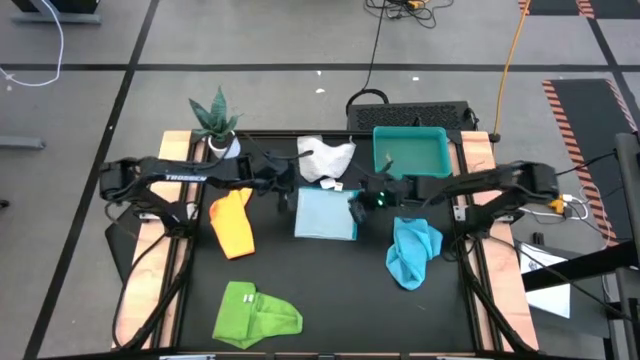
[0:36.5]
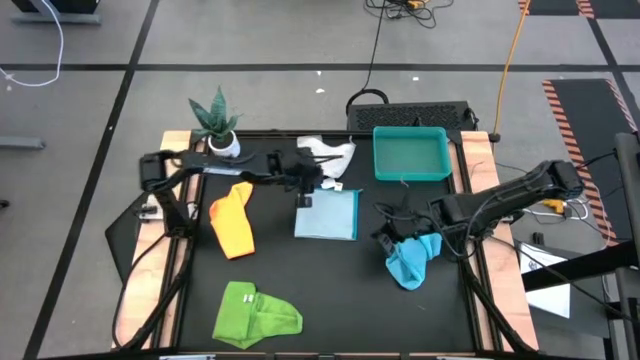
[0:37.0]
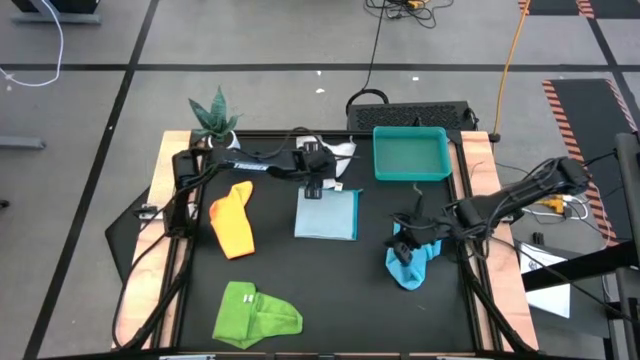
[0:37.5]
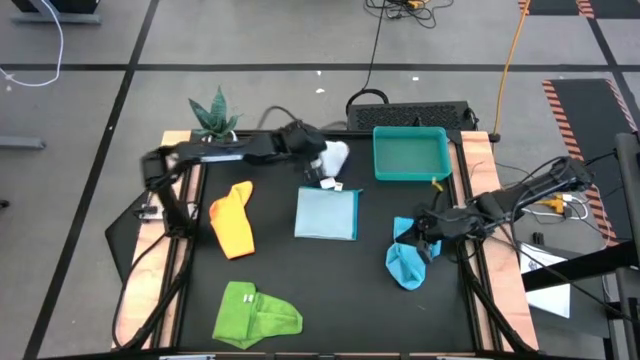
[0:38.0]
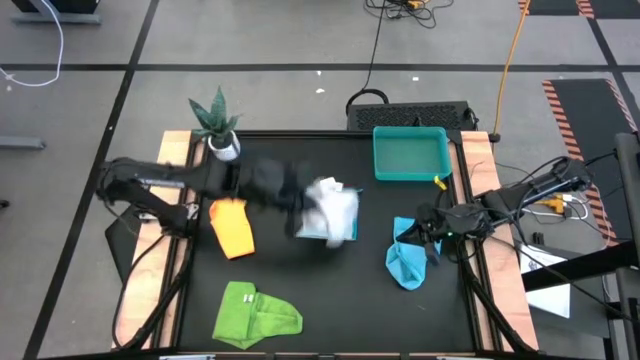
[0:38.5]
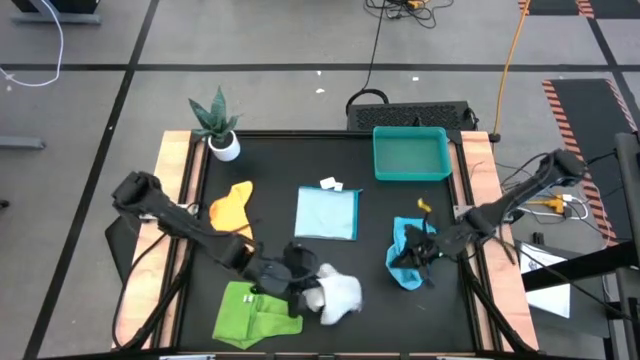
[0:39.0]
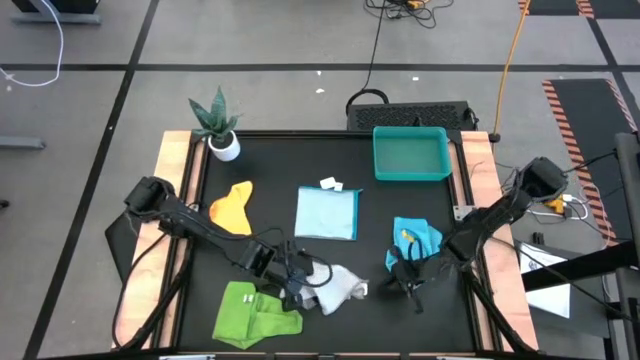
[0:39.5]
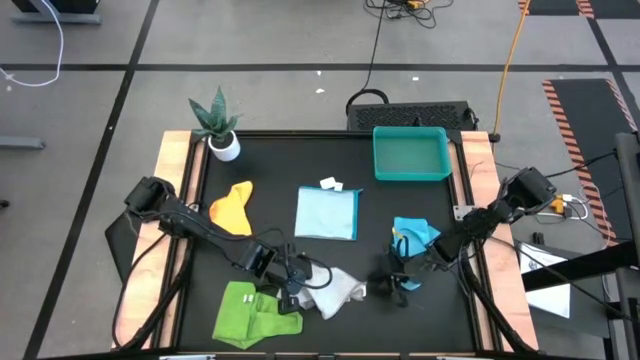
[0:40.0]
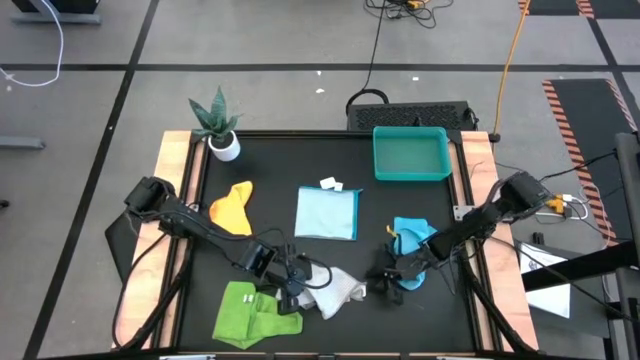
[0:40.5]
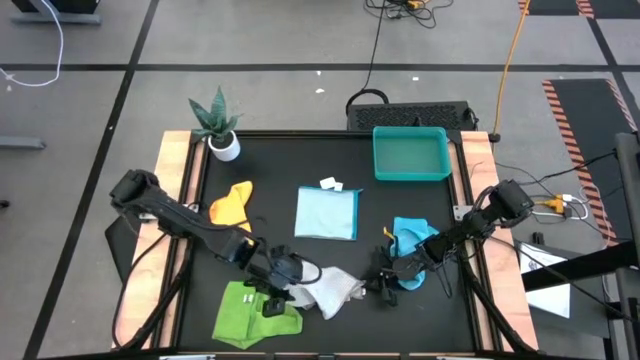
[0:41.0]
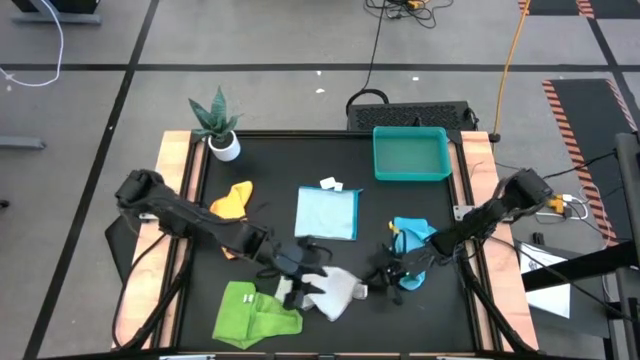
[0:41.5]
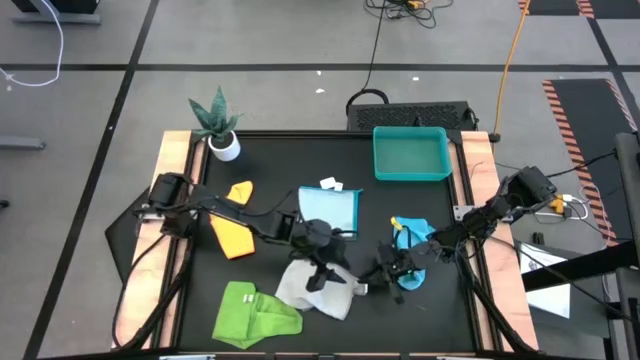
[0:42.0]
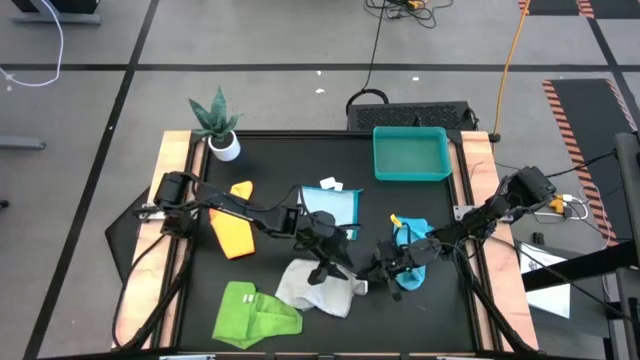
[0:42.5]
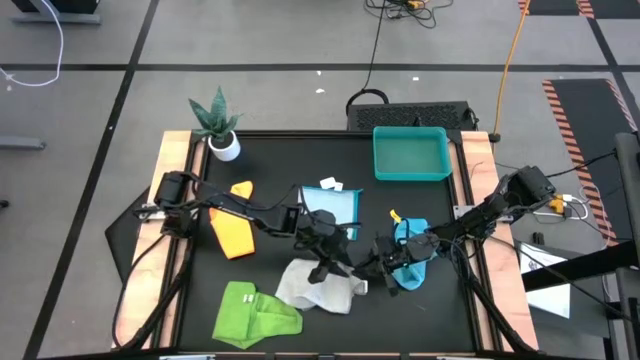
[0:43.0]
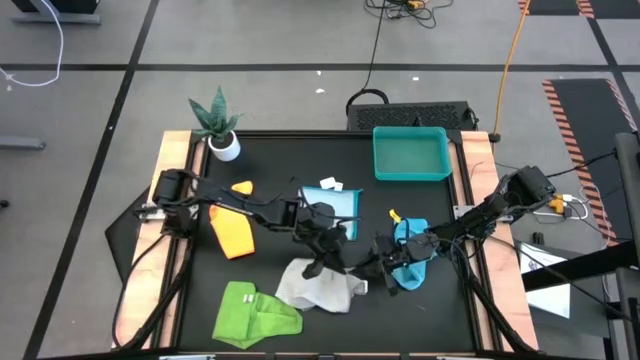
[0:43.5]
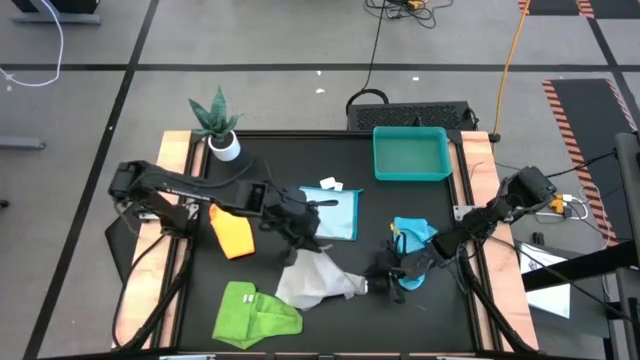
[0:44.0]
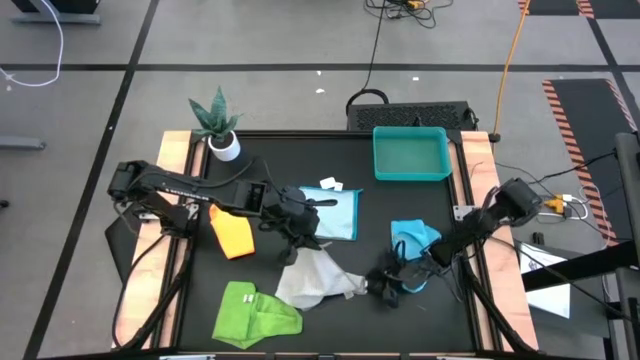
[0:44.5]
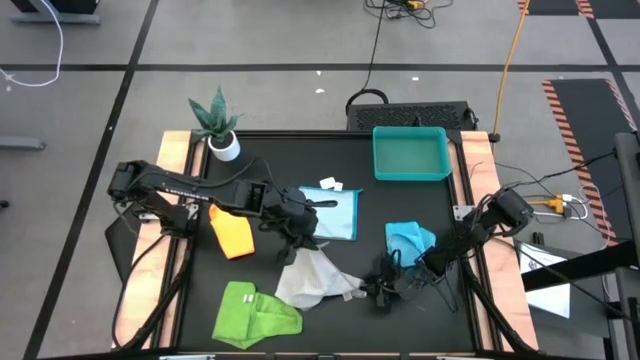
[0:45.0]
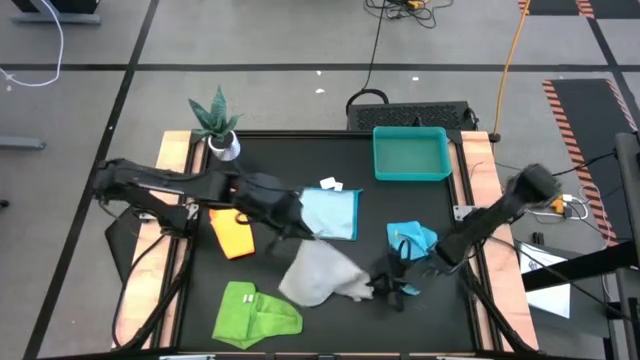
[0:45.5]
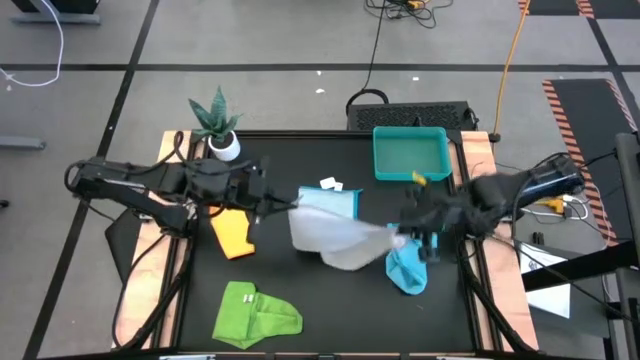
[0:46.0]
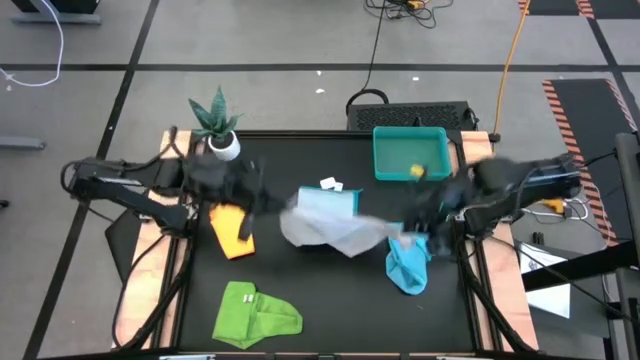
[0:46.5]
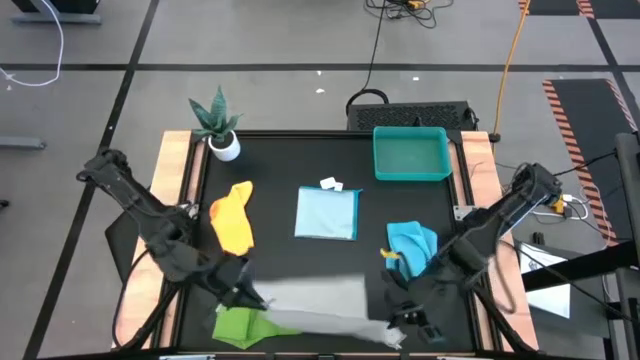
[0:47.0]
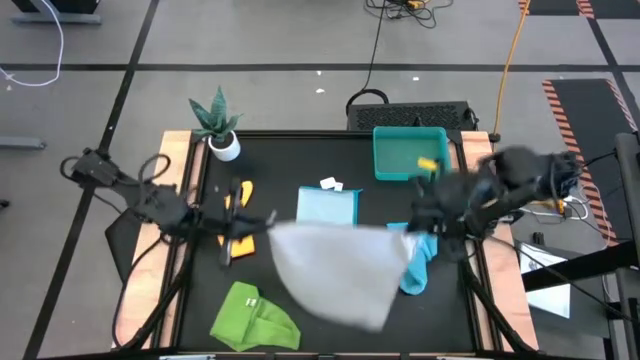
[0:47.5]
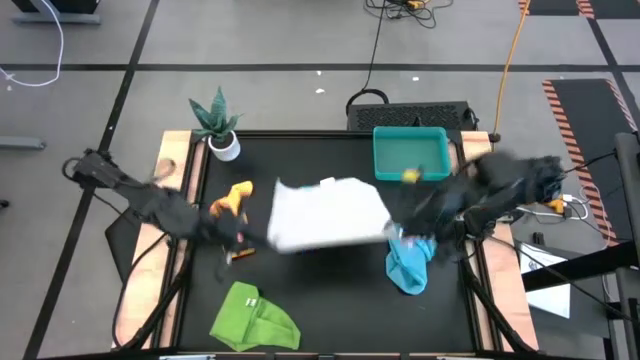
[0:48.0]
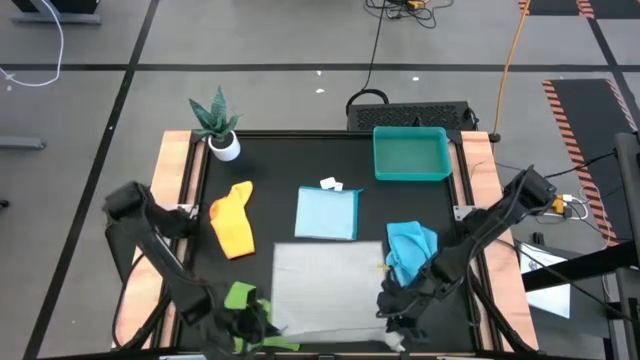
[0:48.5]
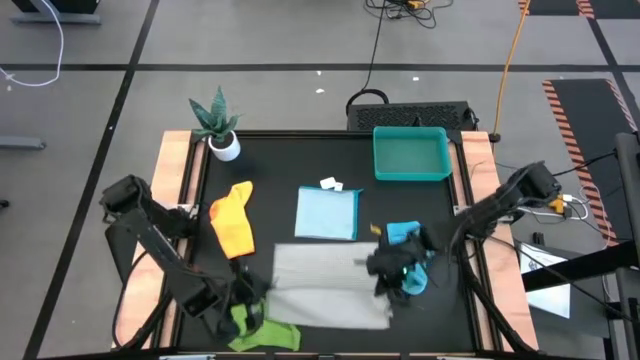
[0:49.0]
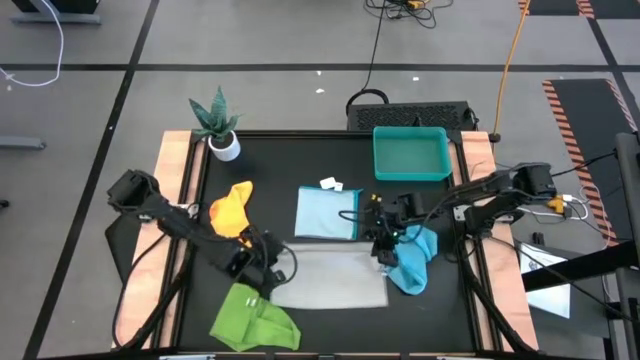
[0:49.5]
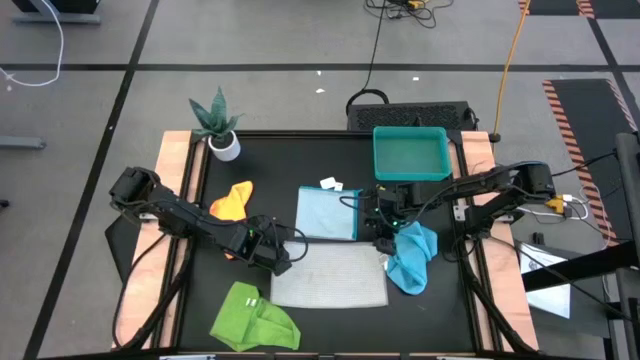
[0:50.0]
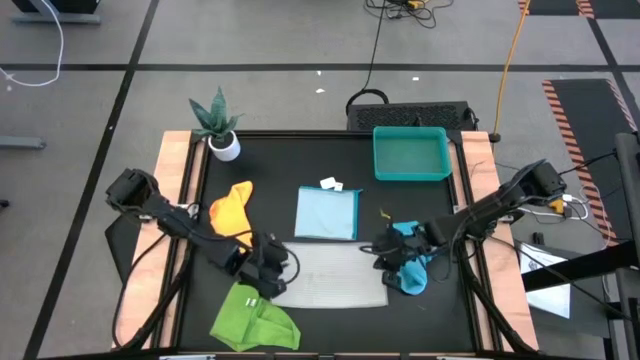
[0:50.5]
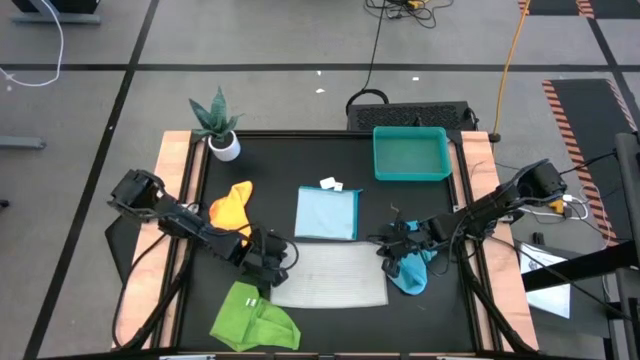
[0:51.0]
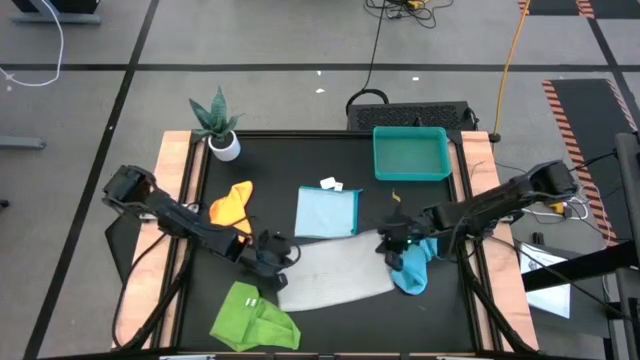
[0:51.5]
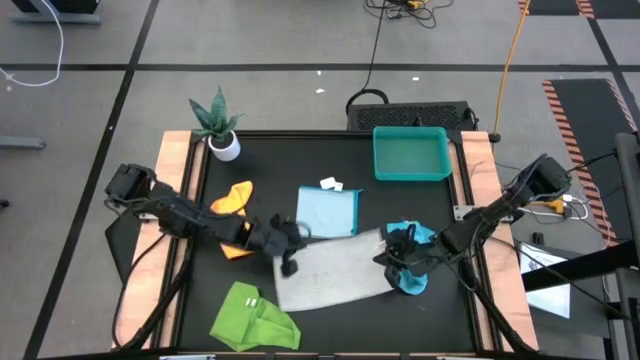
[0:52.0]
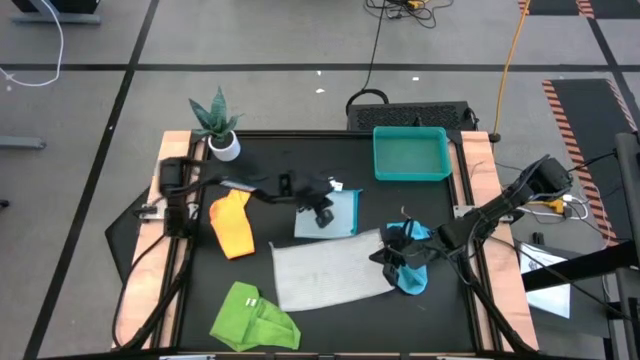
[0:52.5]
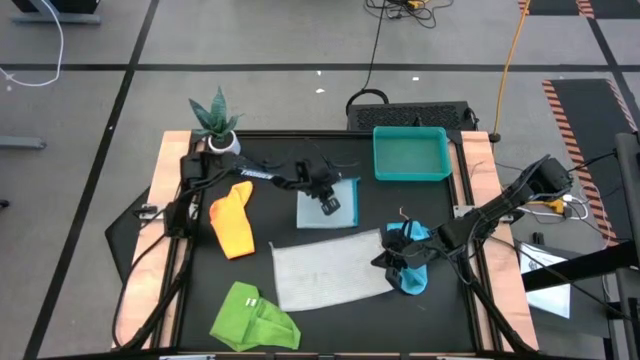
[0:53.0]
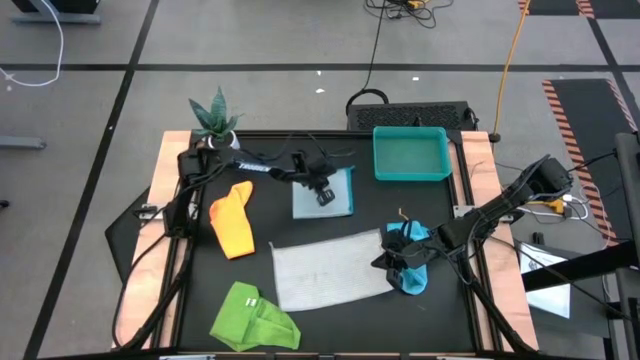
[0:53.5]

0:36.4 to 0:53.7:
Task: Fold microfiber towels
Fold the gray microfiber towel on the towel

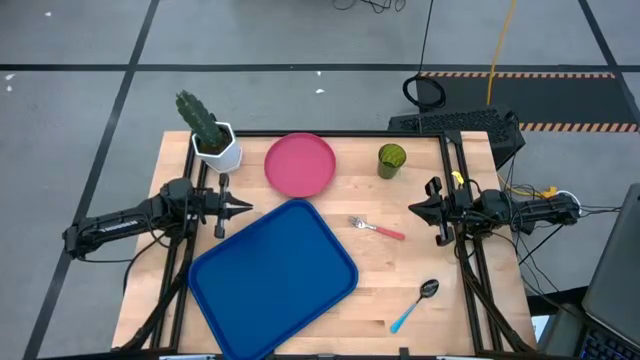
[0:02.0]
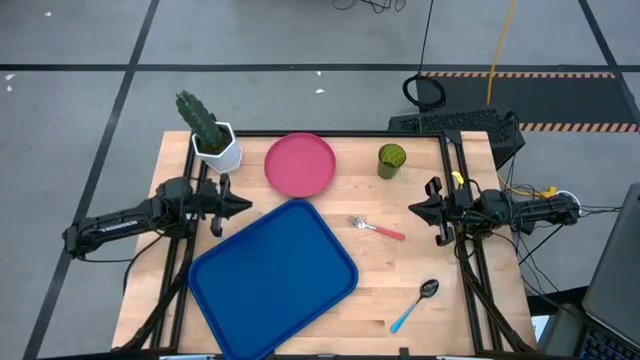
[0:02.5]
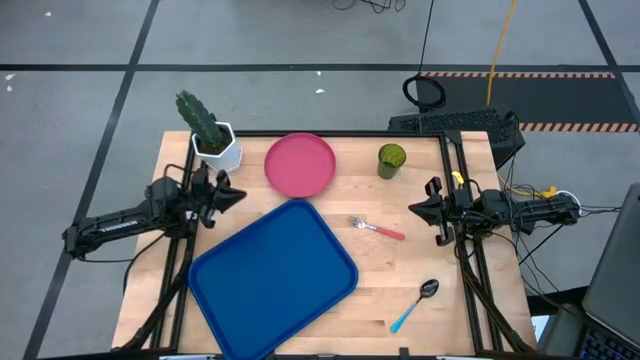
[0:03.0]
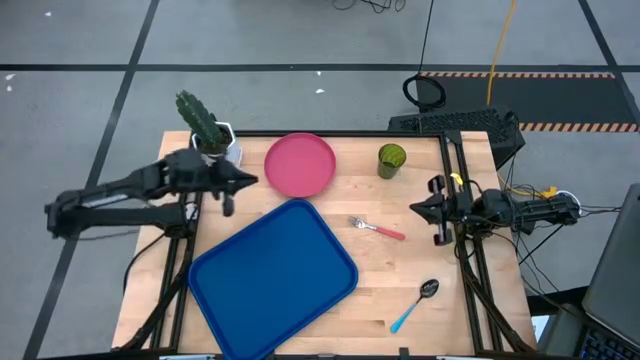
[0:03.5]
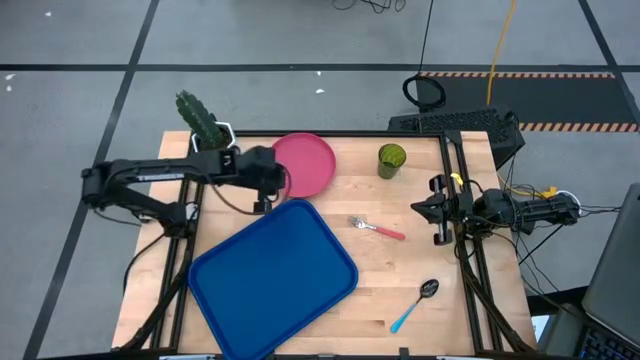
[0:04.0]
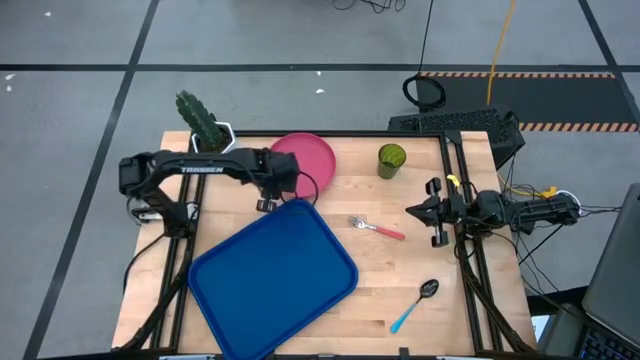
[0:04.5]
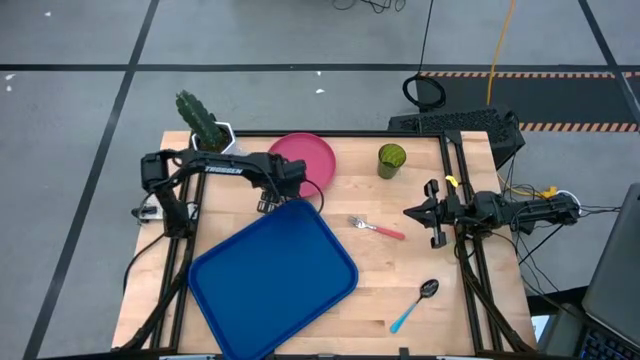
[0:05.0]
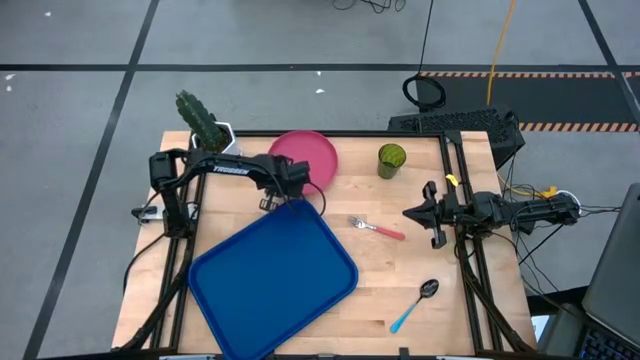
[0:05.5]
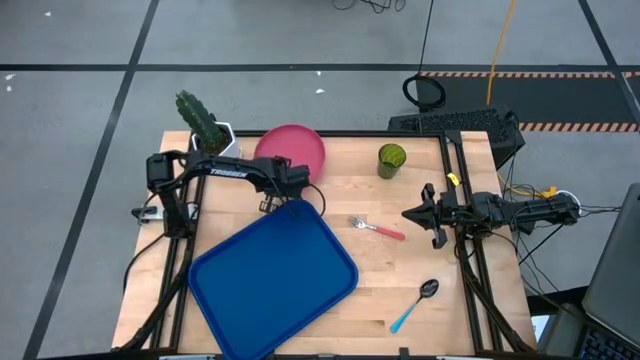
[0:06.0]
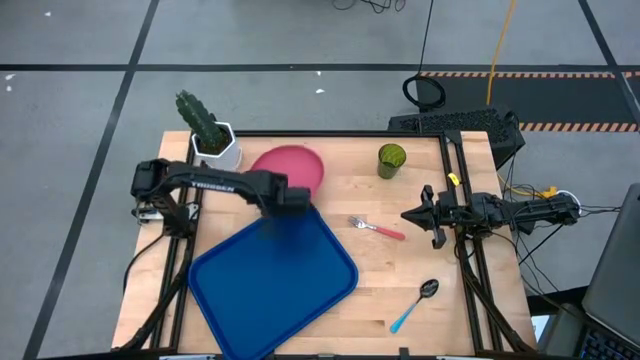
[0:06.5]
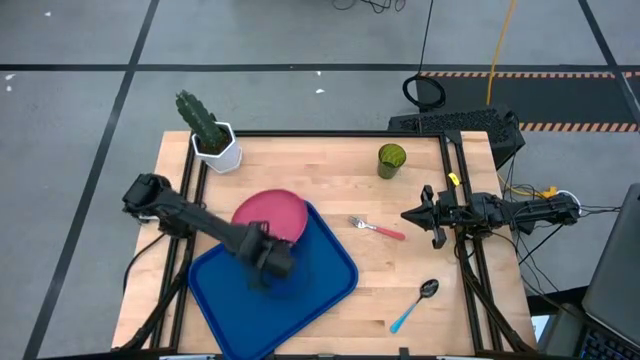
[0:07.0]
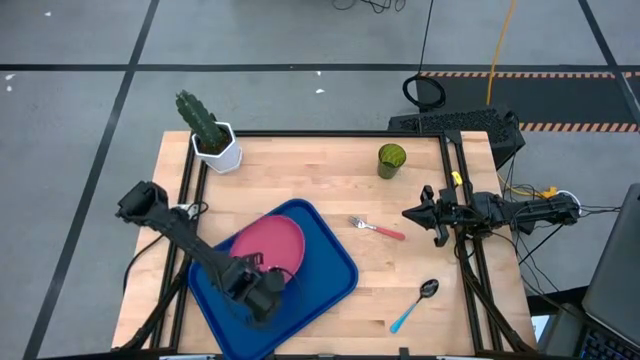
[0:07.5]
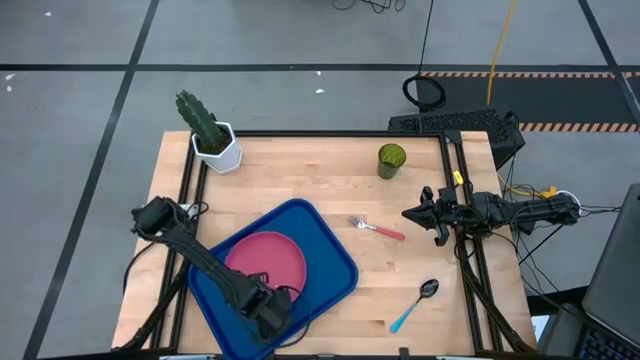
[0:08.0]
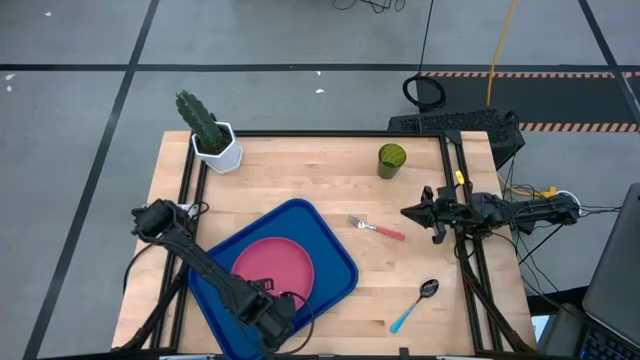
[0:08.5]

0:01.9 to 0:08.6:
Task: Pick and place plate/cup/fork/spoon on tray
Put the pink plate on the center of the blue serving tray
